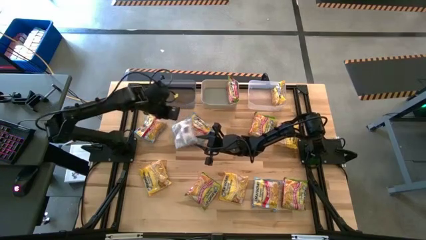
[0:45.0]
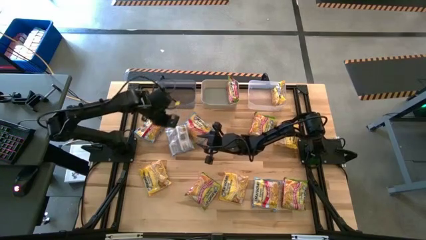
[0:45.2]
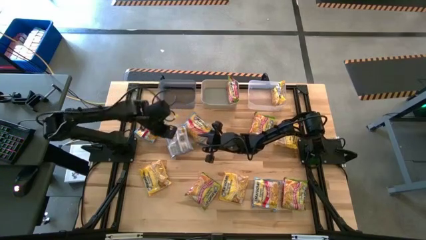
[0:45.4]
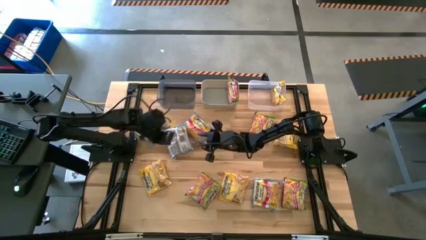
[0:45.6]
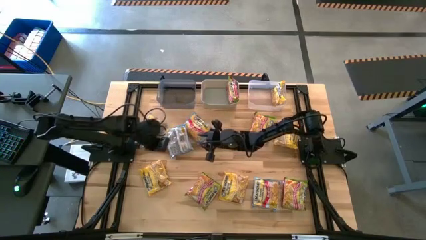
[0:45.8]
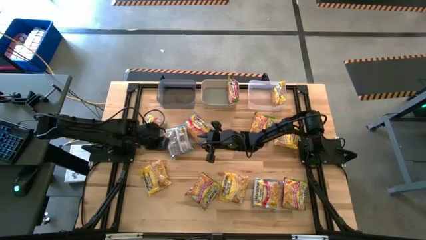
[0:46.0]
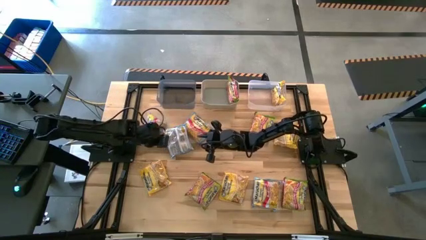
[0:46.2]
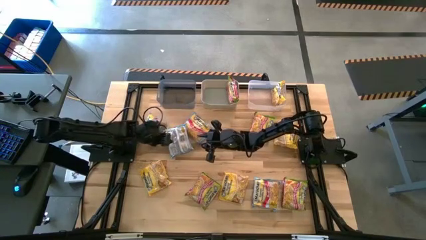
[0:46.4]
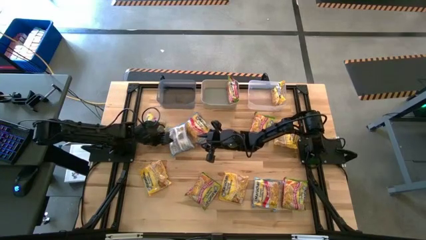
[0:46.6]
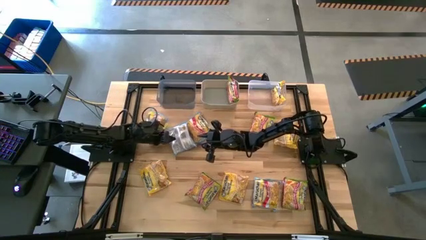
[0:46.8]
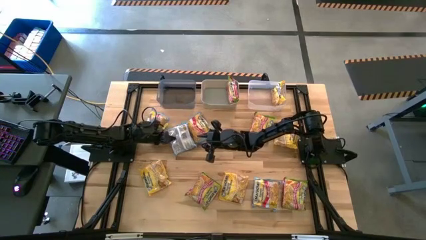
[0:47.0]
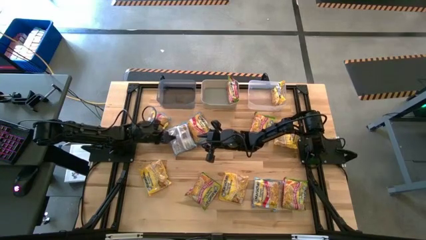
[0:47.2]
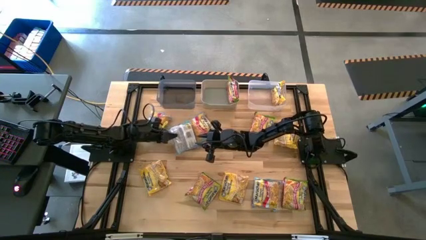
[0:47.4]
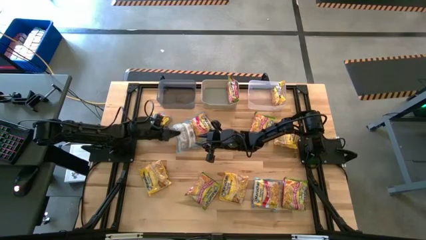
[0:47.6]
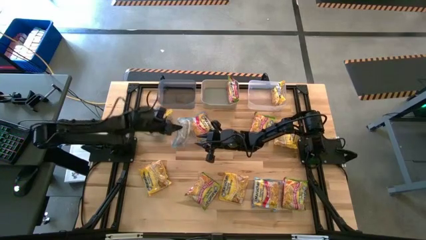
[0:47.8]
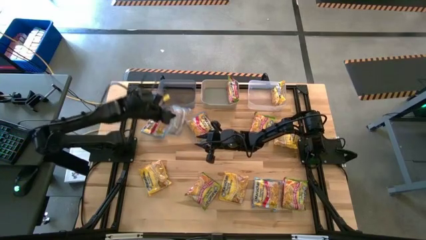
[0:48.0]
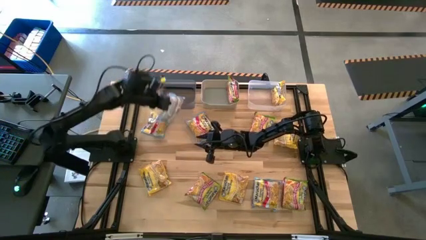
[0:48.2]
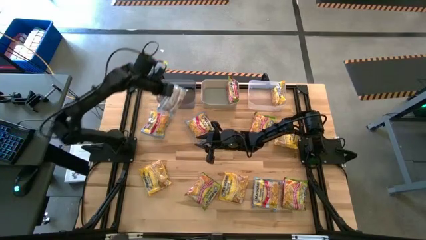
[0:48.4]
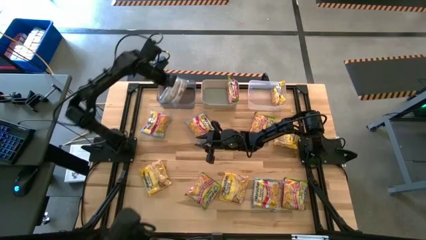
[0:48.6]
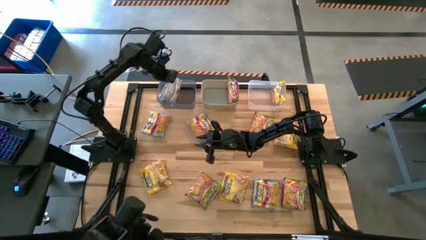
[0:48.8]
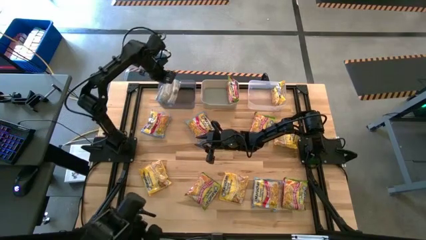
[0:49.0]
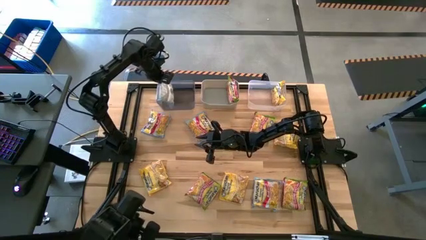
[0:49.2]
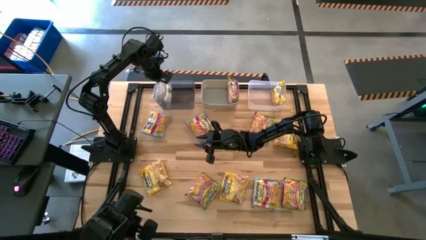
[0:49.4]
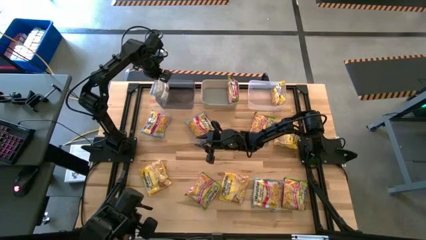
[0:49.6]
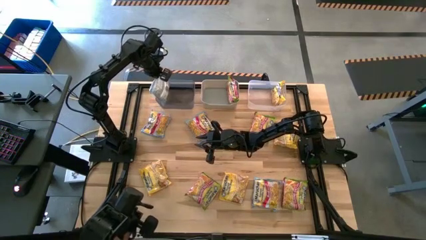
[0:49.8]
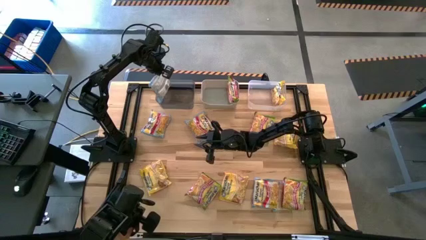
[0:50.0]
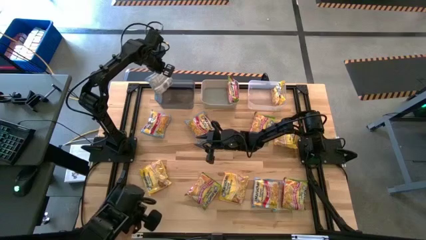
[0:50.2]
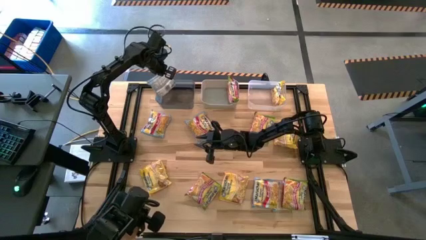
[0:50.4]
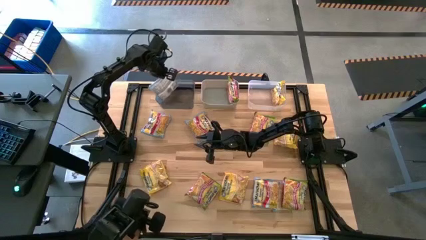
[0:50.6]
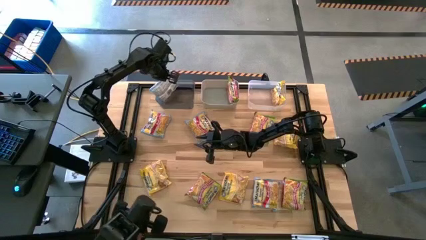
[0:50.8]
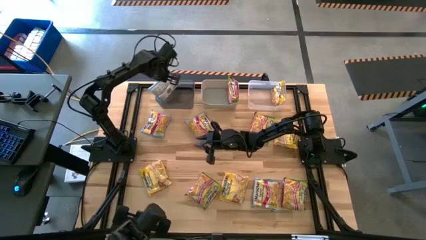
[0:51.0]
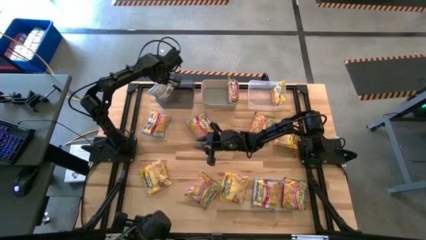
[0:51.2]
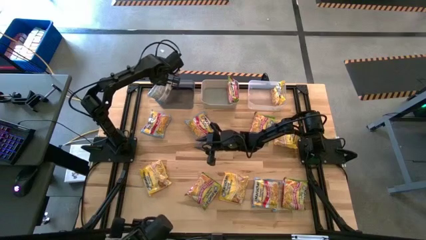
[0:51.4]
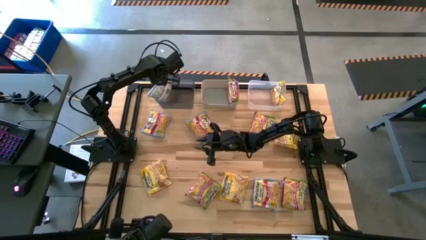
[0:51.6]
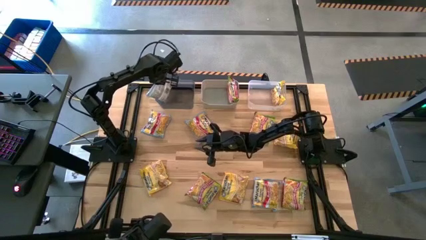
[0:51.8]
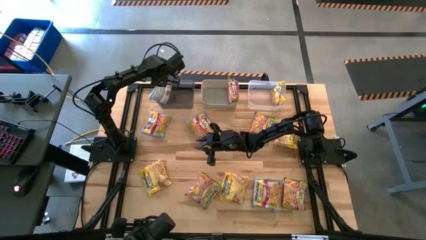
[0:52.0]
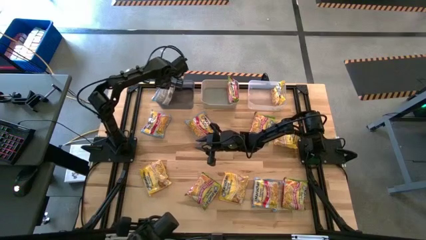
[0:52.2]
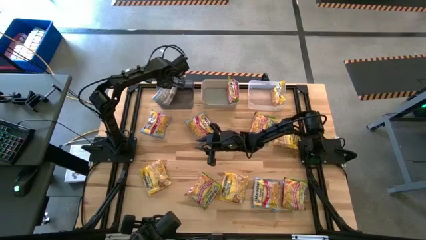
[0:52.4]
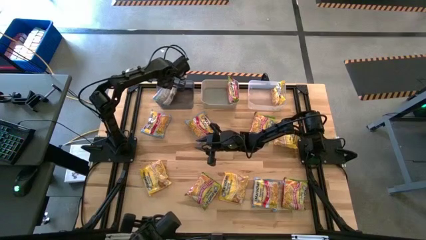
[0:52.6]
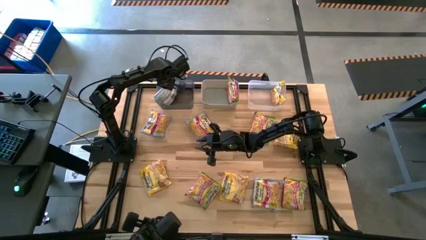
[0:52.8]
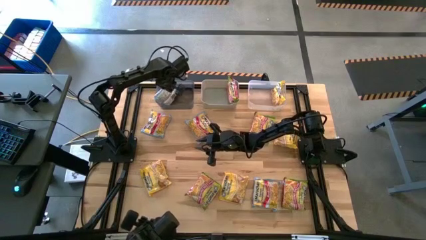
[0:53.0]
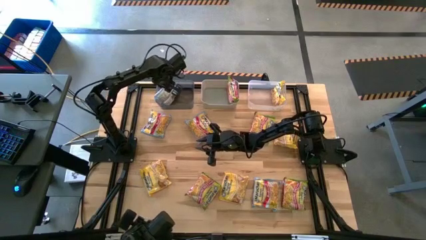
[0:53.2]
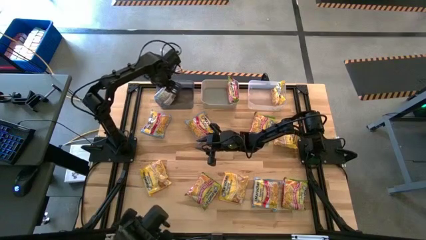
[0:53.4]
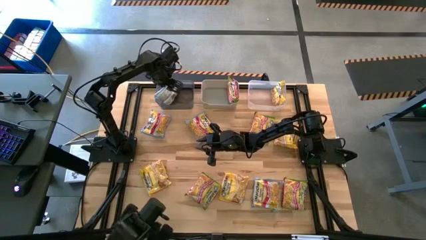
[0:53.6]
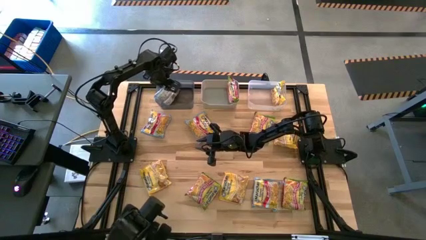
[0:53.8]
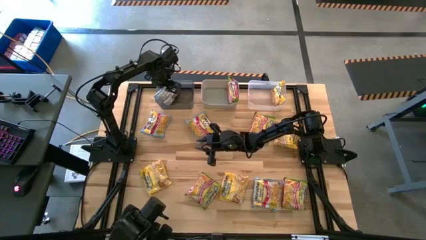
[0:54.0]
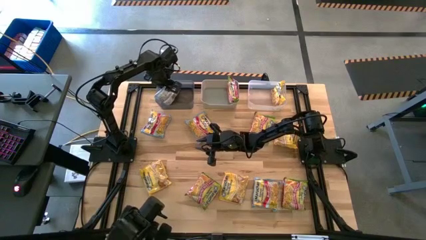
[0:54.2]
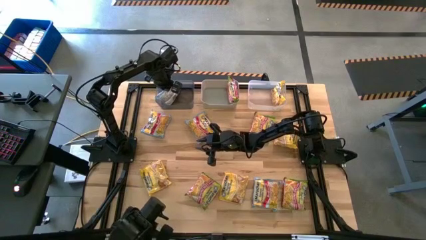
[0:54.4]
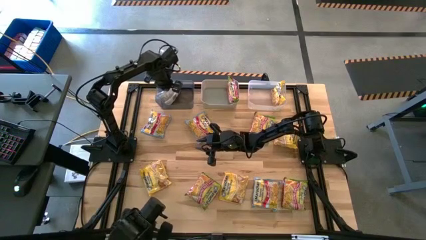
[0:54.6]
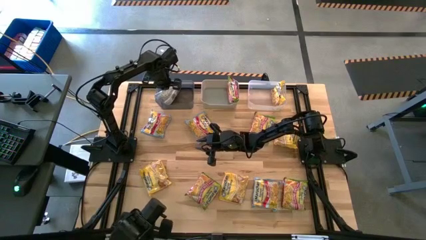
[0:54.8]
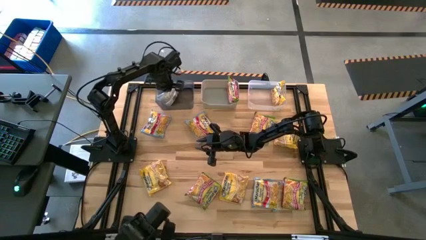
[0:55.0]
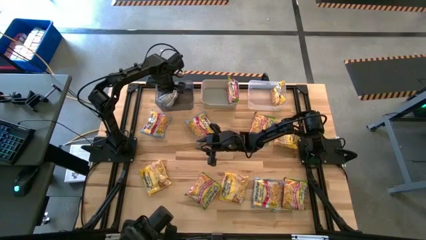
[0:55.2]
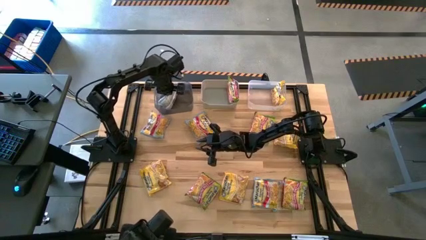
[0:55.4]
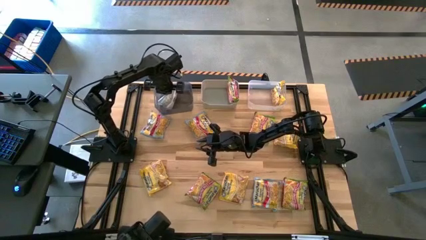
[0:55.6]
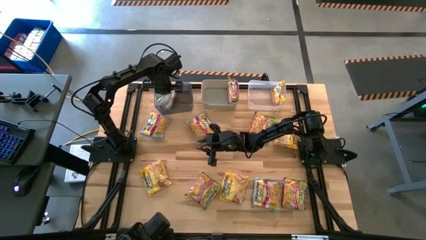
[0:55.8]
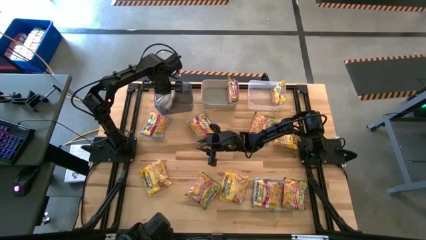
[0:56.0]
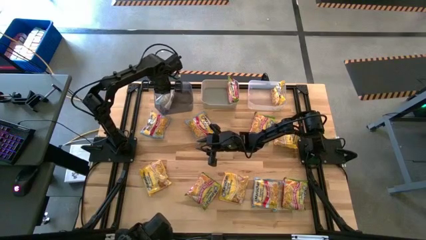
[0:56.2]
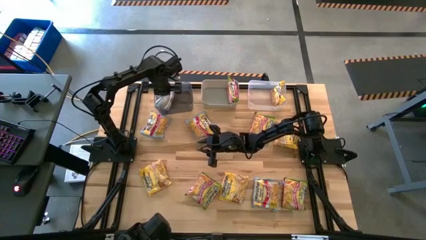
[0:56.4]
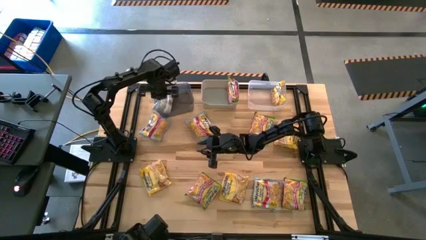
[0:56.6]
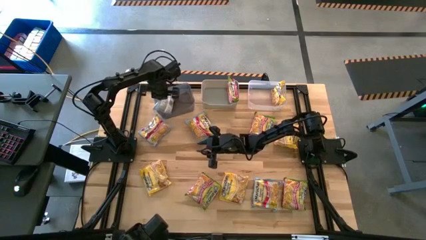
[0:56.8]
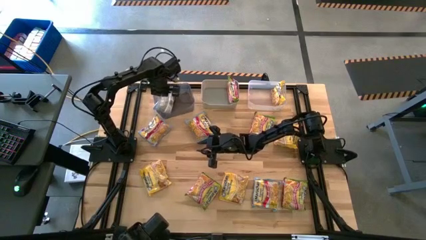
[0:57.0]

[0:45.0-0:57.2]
Task: Sort Maruchan noodles
Put the bottom left blue noodle pack into the black bin

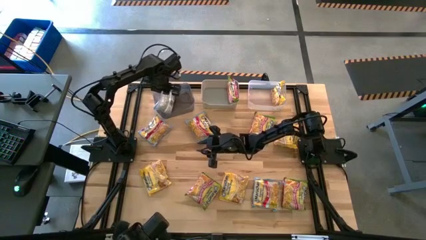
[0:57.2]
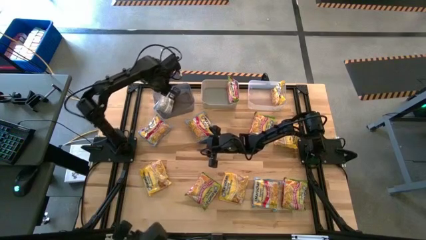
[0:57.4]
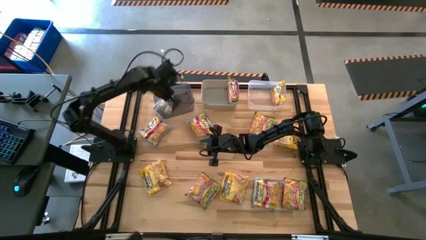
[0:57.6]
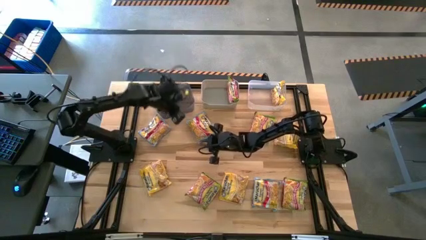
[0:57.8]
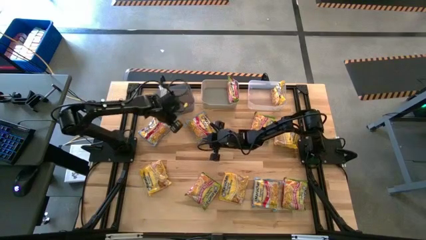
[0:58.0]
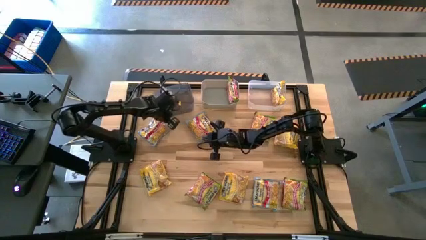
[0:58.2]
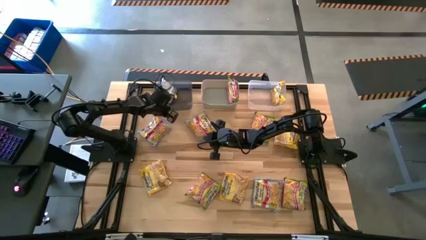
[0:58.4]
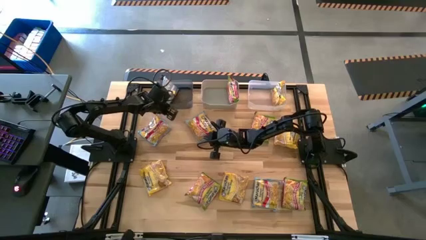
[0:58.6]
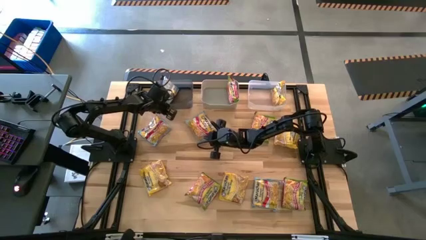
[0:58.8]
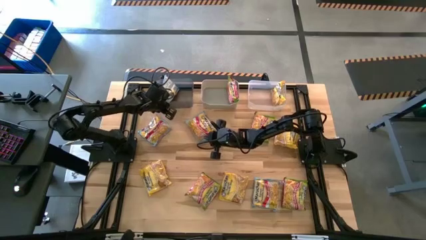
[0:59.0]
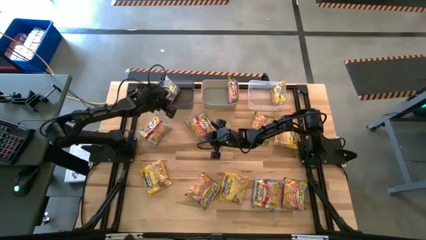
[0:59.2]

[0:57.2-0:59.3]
Adjust the black bin

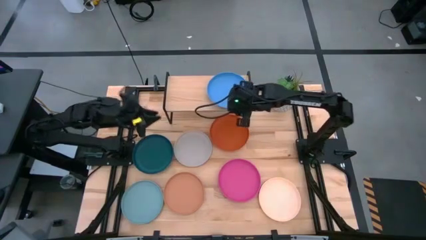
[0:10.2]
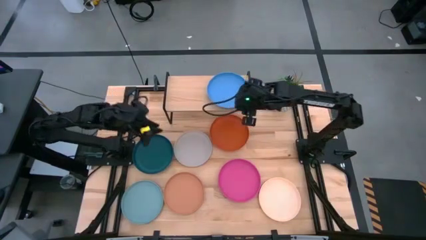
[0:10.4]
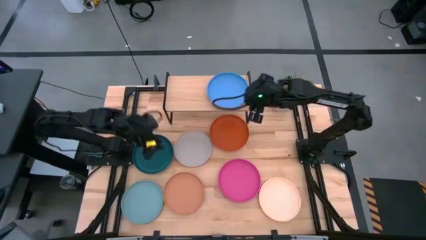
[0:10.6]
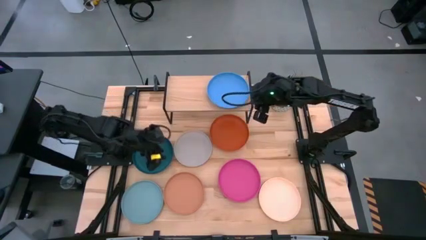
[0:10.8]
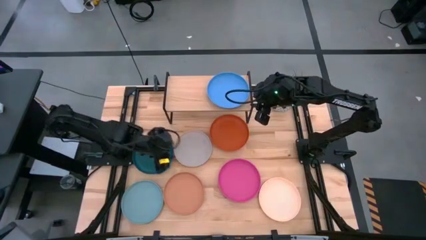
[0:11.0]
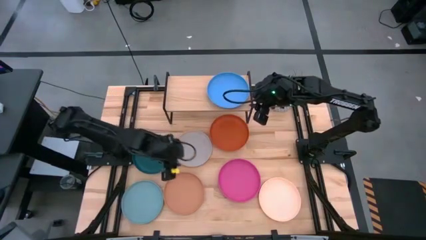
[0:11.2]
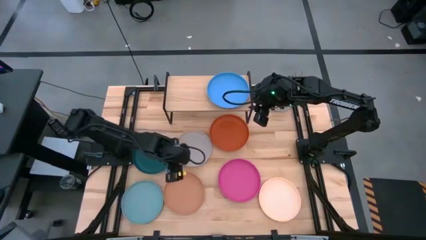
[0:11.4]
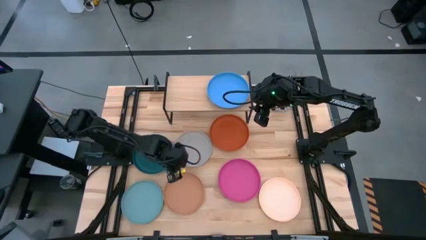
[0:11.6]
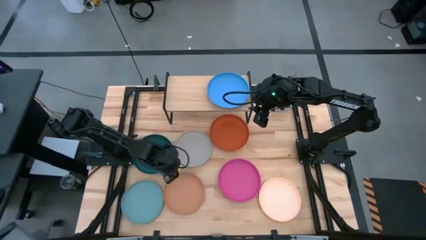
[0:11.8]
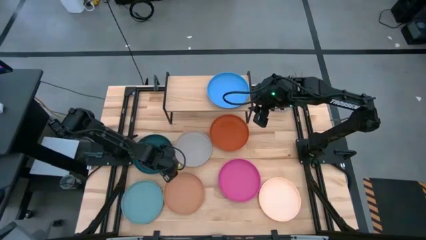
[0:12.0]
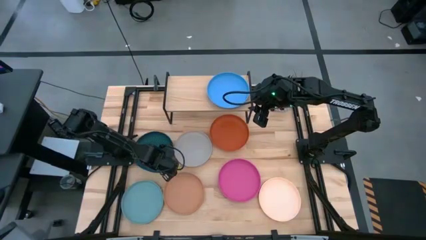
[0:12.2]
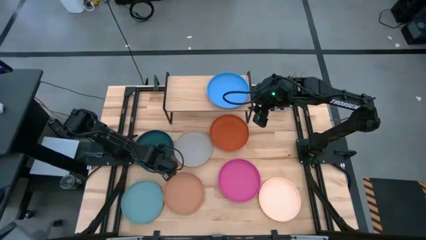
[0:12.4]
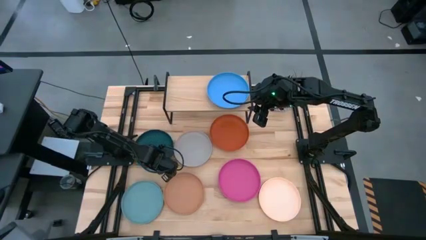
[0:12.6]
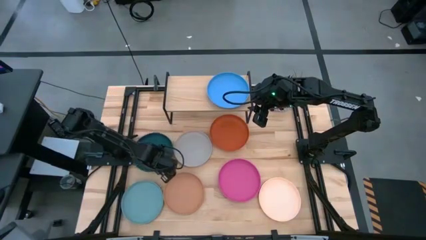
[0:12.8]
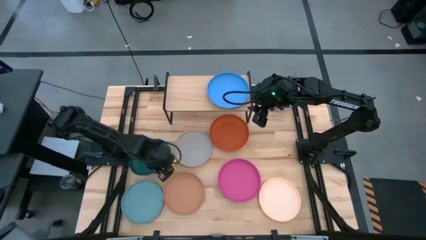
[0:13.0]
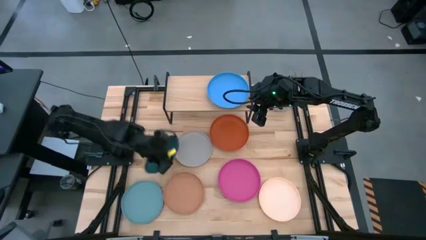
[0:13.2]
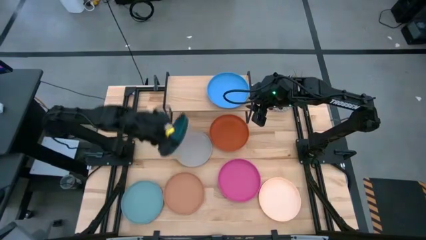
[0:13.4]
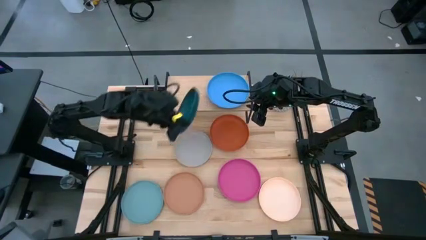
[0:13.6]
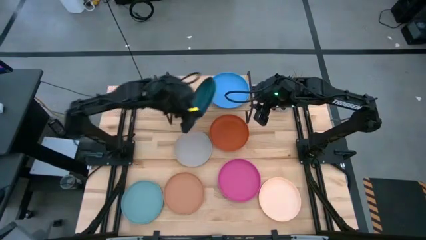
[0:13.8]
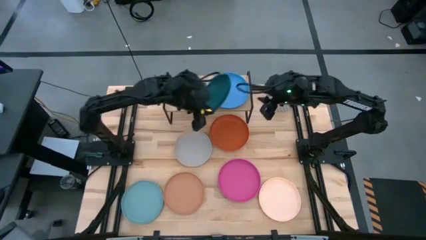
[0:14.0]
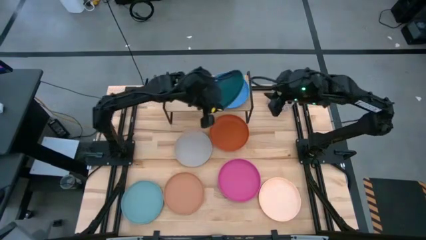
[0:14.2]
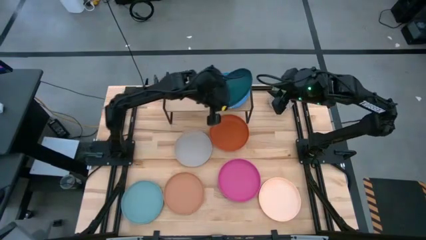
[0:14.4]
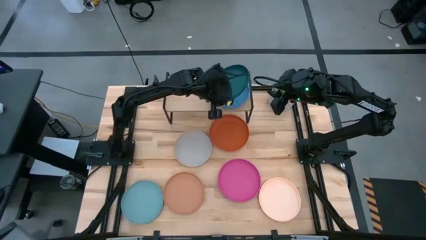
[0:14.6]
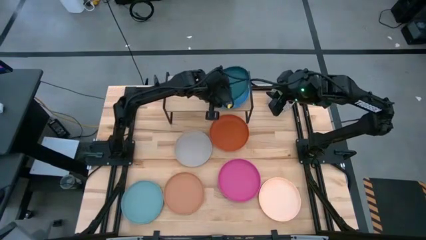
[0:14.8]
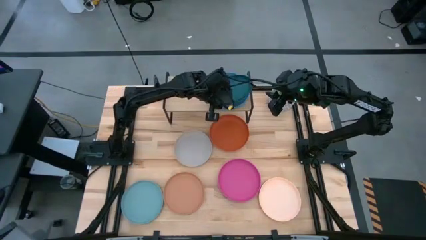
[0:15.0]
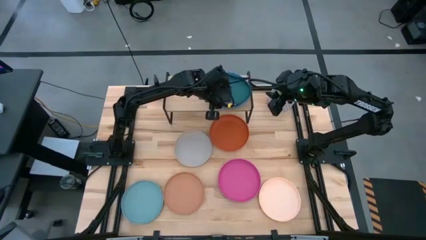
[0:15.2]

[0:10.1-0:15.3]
Task: Place and stack plates onto a shelf
Stack the dark green plate on top of the blue plate on the shelf
